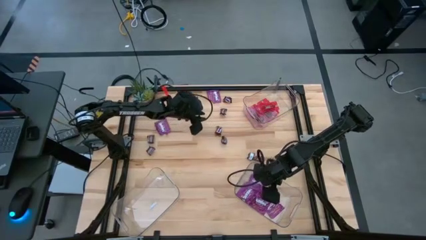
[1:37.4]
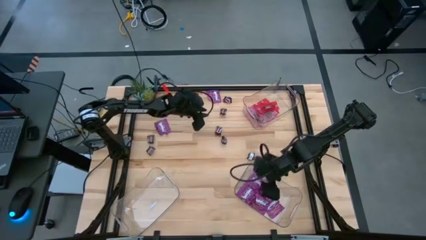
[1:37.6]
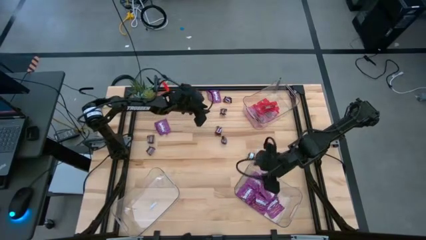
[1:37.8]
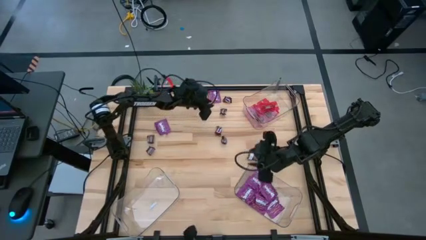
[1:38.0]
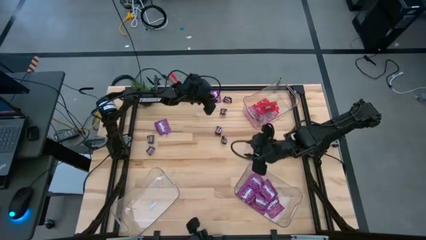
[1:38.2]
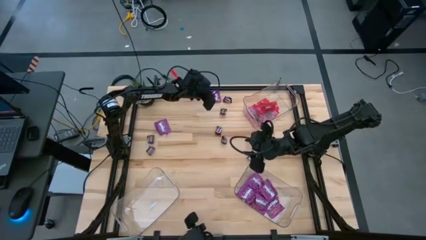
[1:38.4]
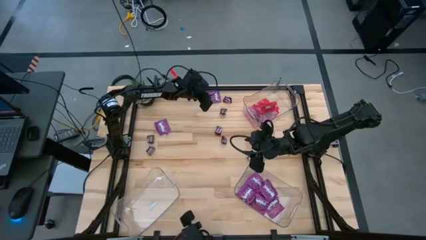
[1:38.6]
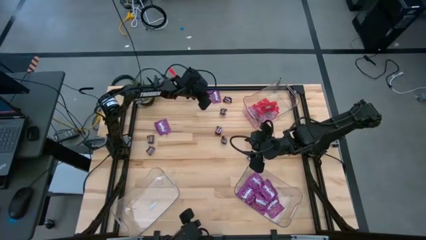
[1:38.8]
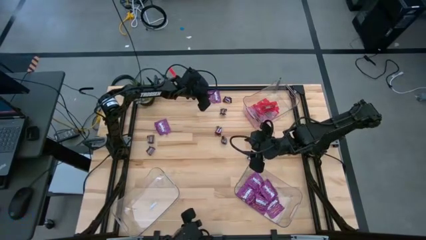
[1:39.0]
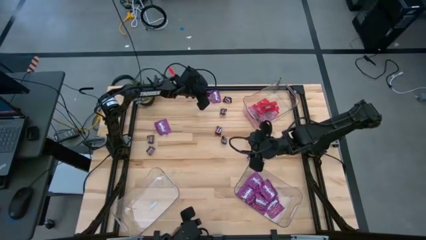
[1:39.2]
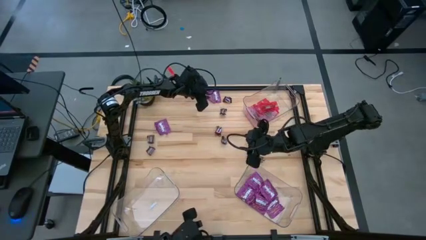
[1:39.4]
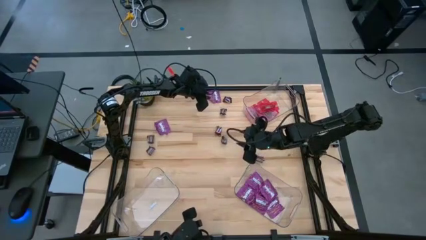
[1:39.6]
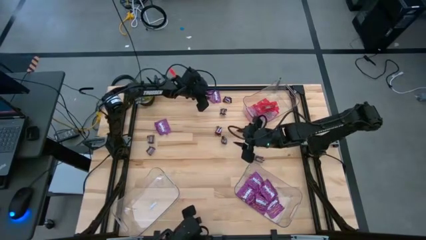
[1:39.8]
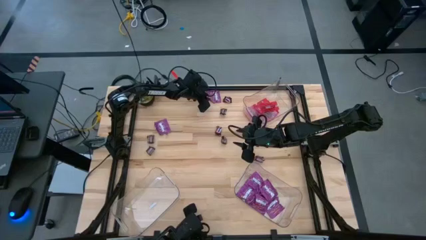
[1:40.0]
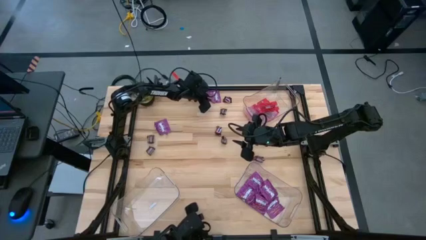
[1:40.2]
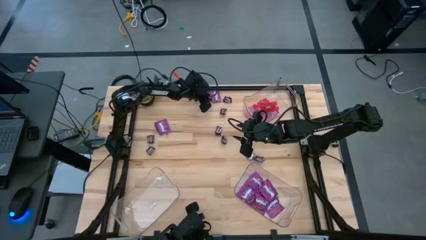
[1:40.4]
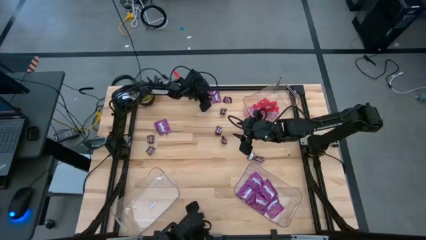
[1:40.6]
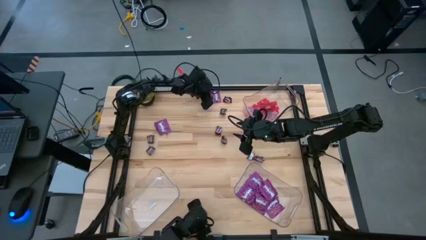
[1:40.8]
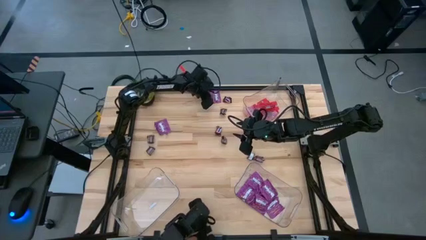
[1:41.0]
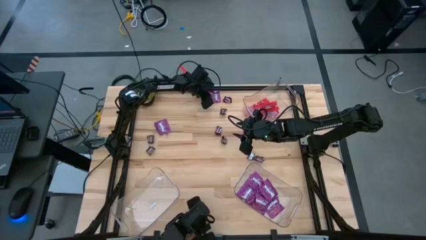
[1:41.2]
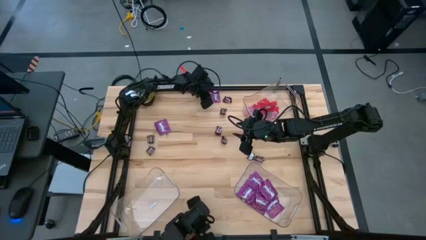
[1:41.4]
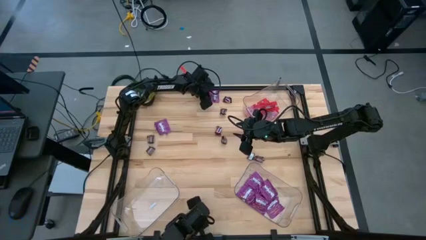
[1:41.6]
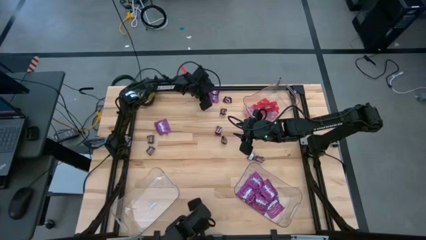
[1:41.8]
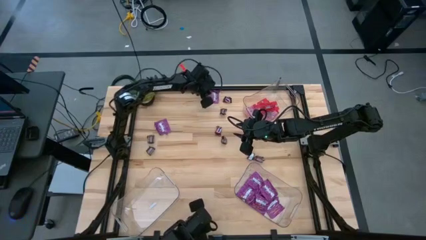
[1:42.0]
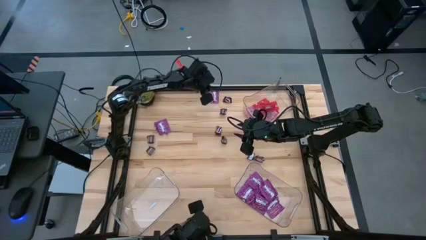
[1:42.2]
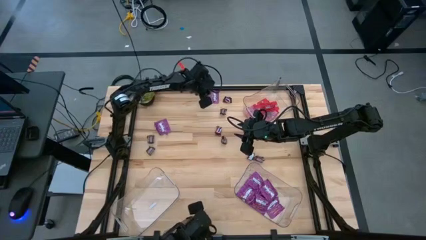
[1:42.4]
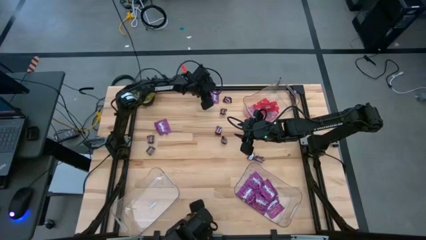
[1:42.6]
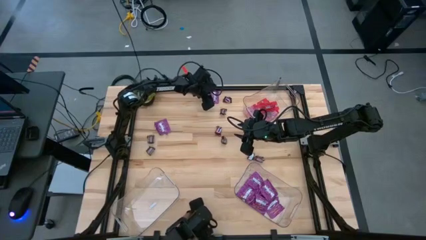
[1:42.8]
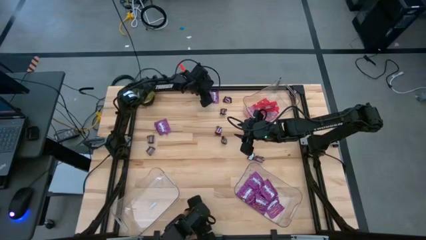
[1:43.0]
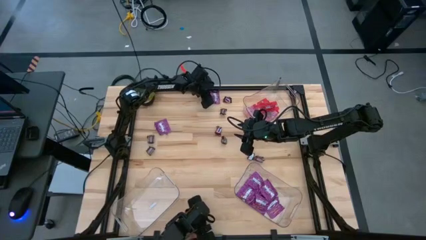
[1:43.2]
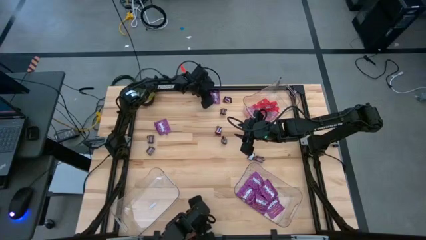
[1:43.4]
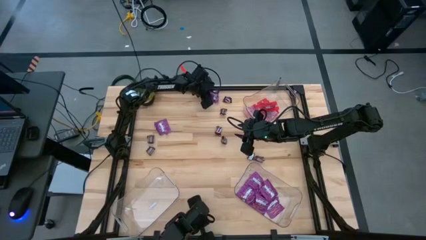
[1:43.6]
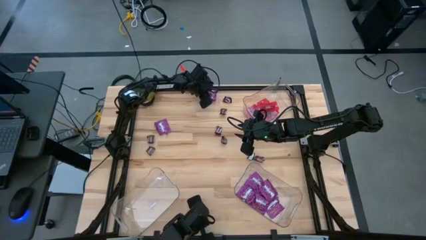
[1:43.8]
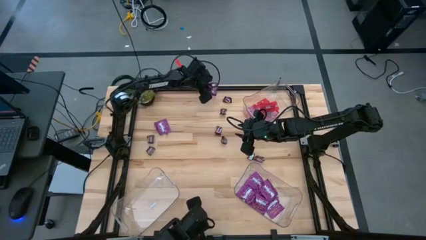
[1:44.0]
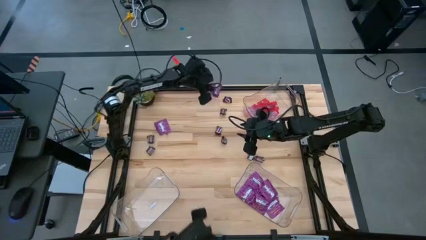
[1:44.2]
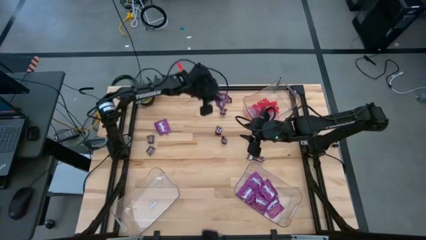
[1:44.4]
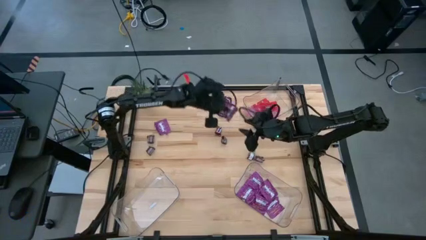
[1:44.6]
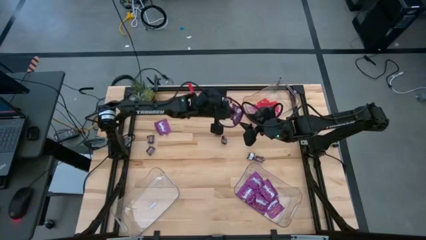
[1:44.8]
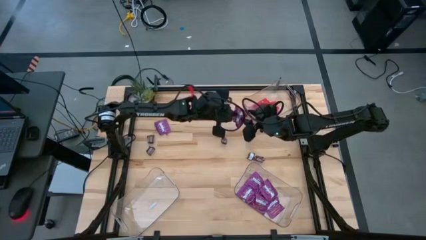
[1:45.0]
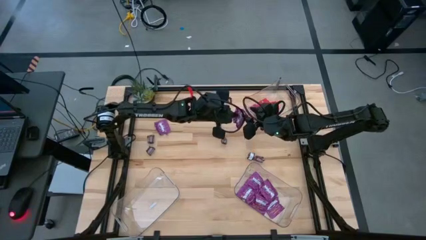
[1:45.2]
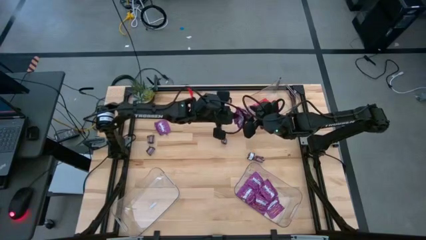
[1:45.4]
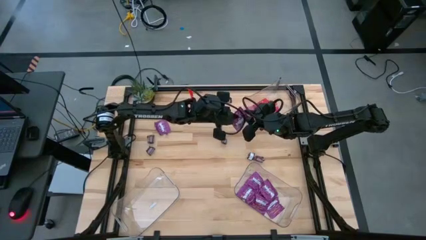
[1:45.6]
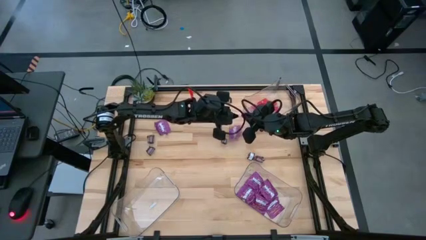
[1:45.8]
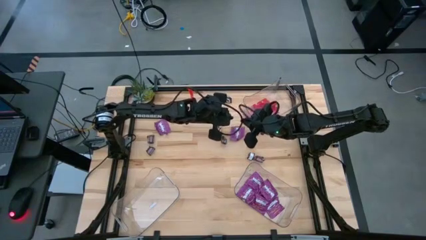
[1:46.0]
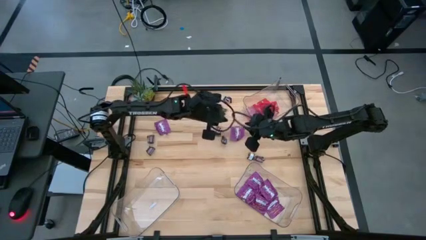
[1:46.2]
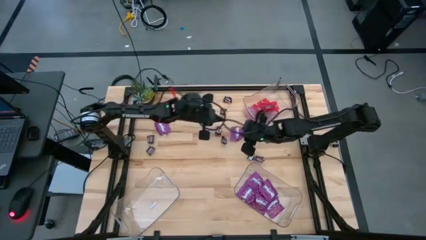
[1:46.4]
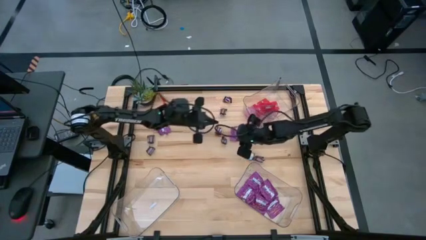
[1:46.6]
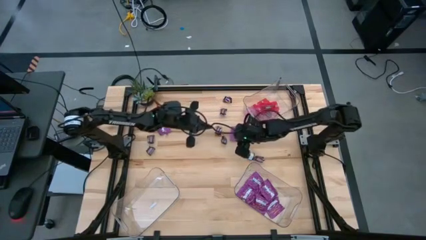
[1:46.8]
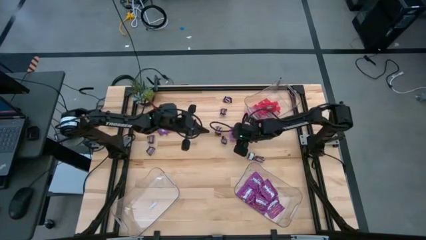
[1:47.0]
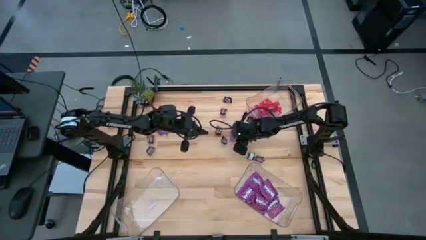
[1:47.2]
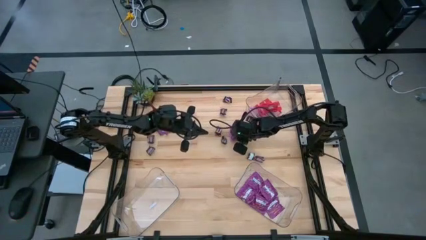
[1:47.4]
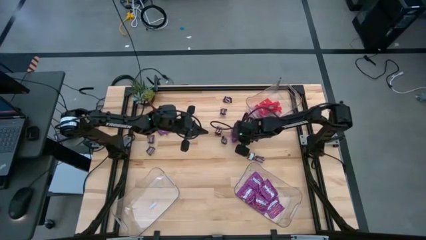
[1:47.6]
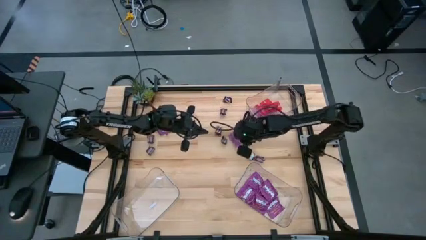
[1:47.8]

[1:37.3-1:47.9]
Task: Sort candy
Put the violet candy into the bottom right transparent bin

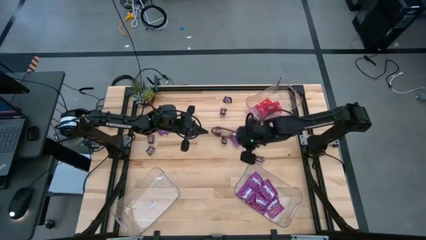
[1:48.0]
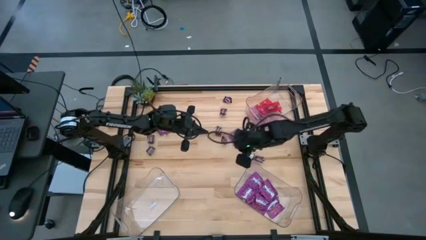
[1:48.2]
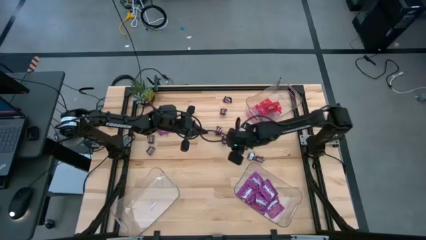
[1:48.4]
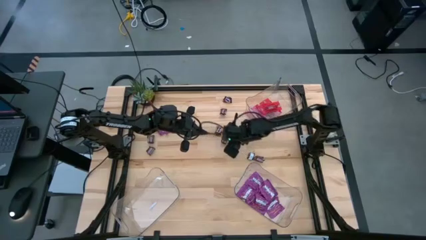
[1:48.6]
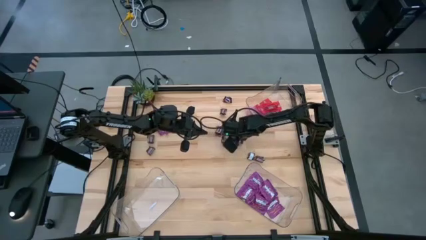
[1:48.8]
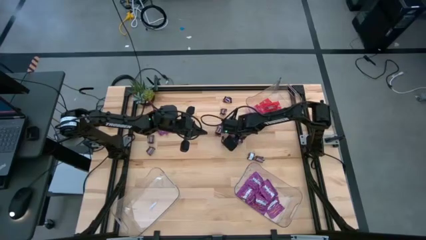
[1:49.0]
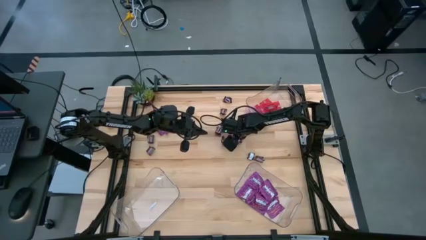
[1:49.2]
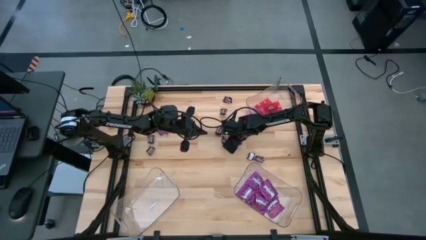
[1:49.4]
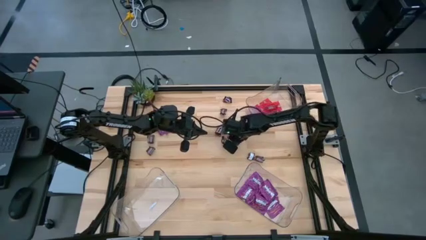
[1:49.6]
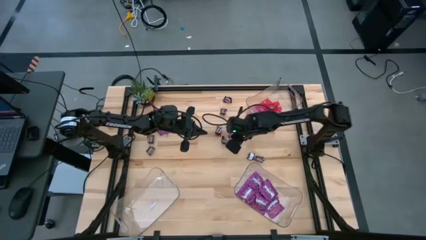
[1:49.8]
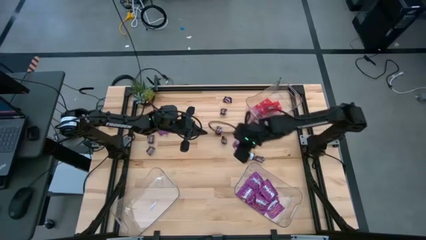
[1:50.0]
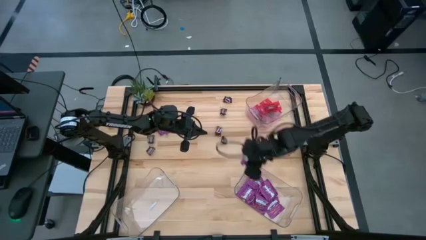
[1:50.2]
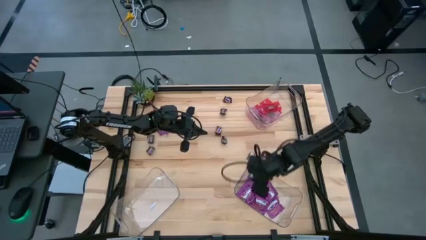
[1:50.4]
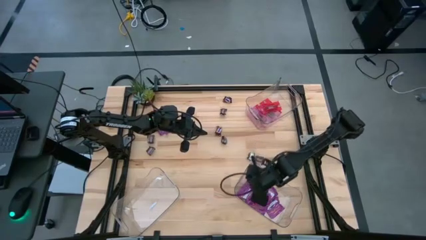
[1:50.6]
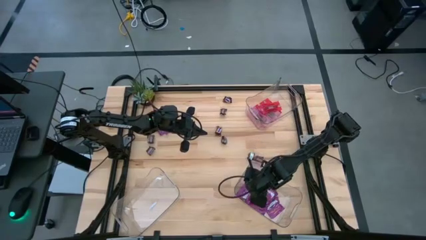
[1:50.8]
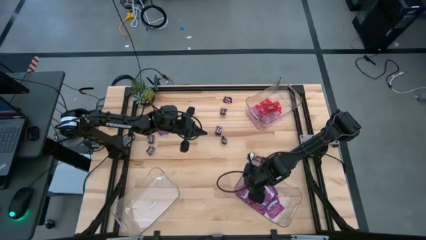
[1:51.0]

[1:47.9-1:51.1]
Put the violet candy into the bottom right transparent bin

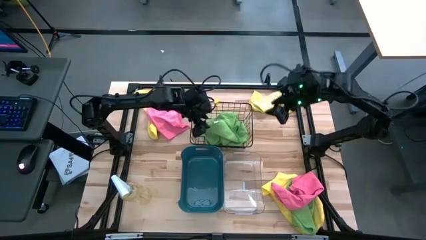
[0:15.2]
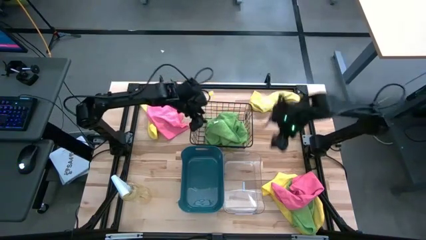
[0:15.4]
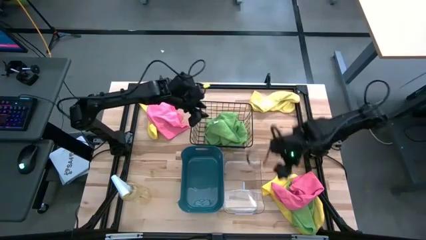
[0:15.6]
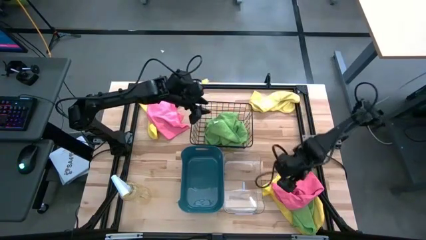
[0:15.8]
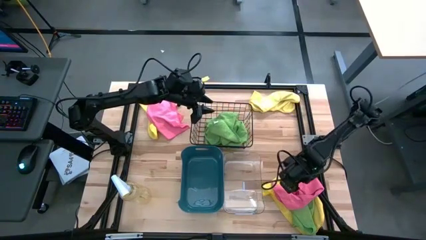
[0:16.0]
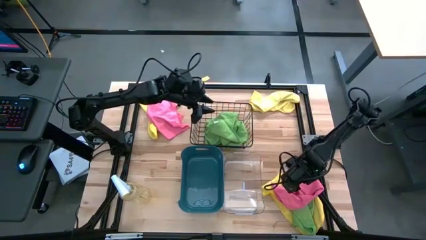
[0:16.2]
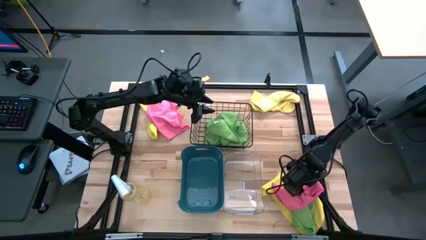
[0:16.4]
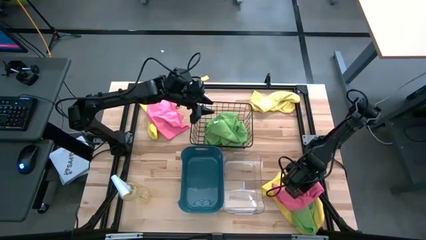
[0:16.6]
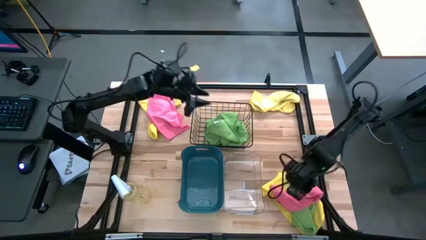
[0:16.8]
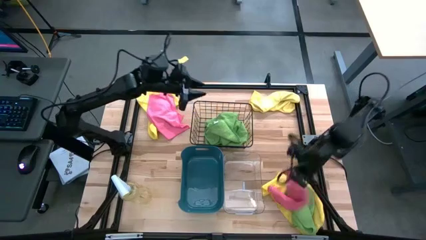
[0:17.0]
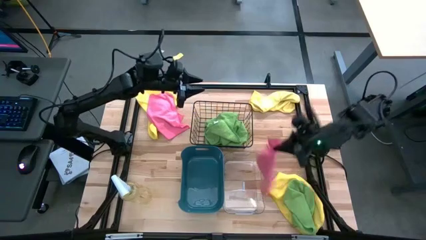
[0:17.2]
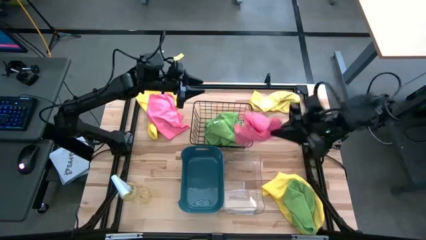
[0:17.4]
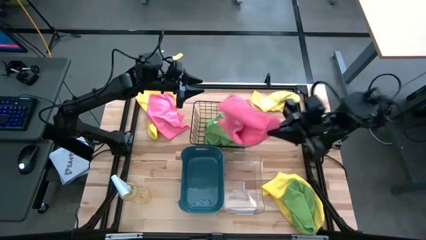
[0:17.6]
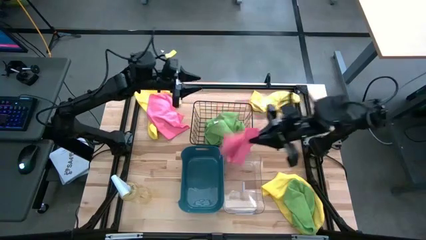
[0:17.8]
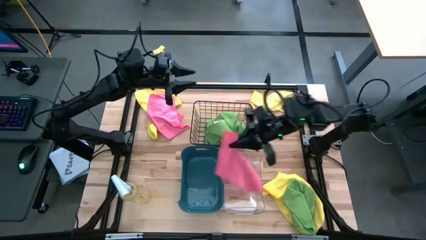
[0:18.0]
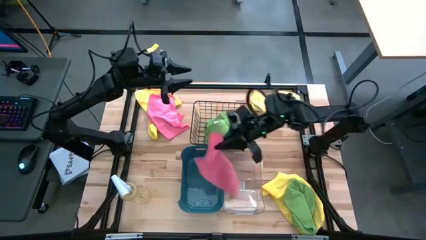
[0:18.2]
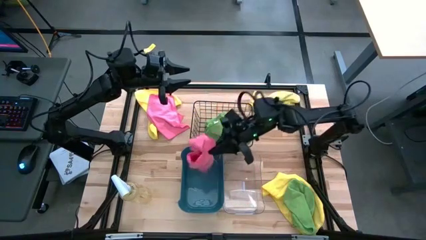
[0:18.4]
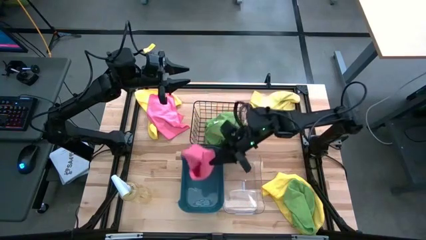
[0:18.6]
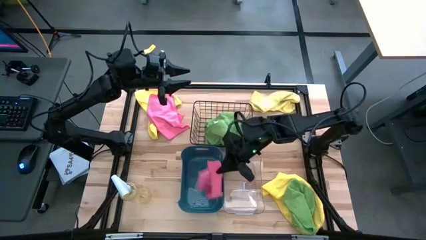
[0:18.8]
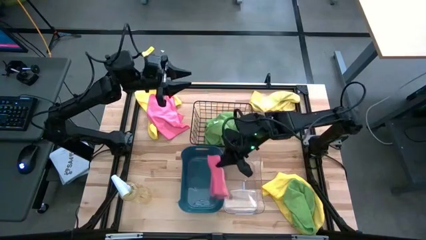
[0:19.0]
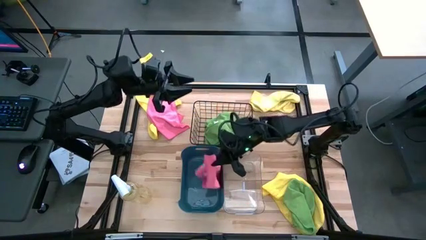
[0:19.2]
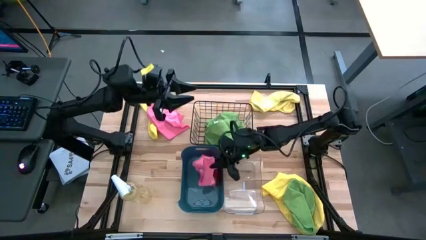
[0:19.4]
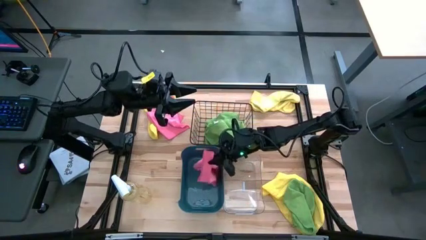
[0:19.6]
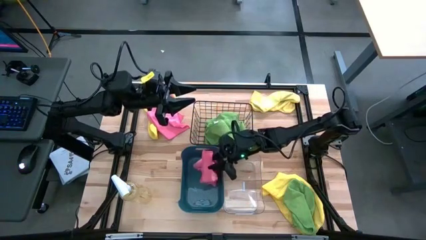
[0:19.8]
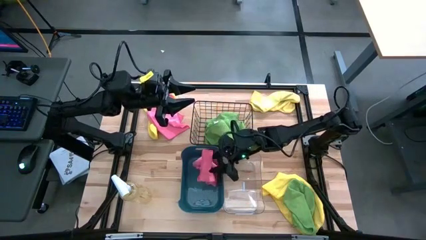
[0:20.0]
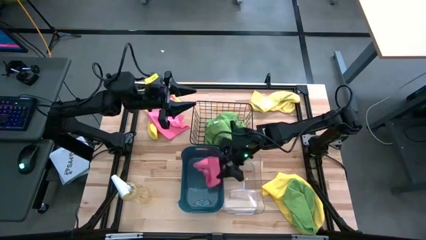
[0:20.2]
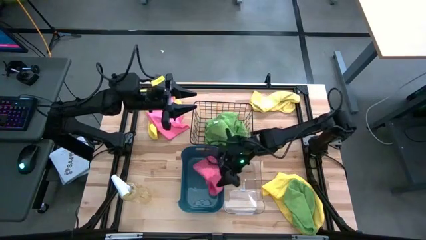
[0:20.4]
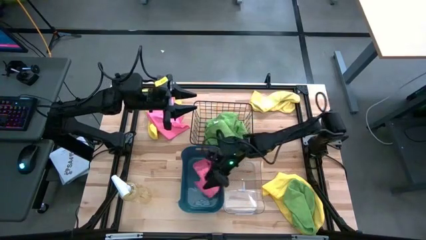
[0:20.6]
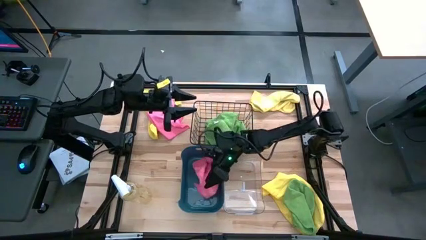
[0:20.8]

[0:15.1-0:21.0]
Task: Sort microfiber towel by color & place in baskets
Put the bottom pink microfiber cloth into the blue bin
